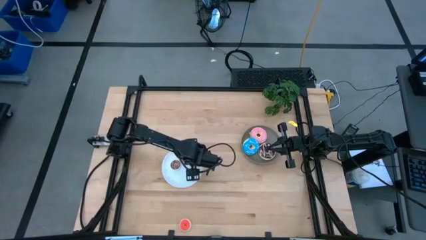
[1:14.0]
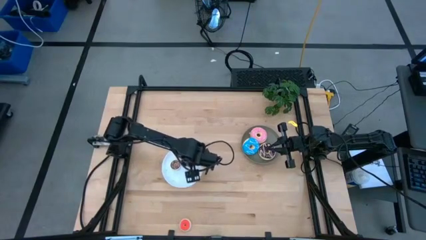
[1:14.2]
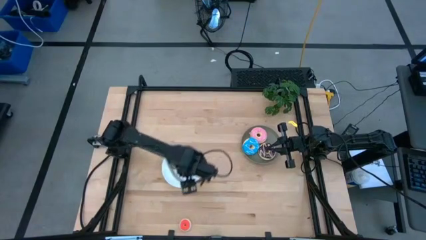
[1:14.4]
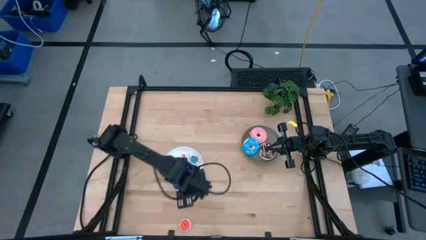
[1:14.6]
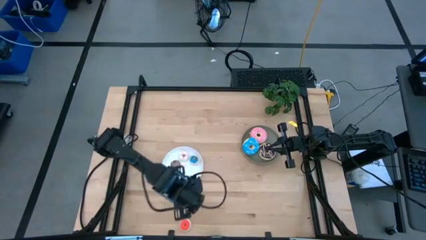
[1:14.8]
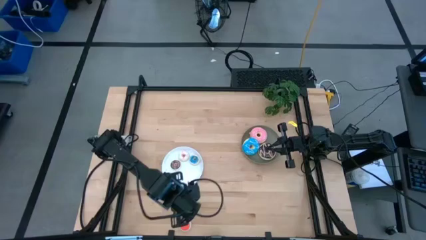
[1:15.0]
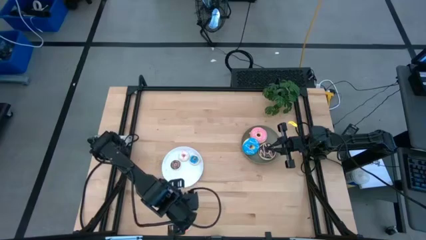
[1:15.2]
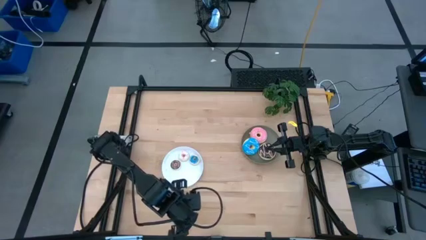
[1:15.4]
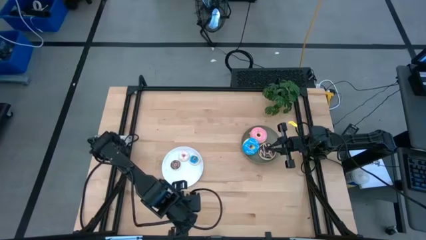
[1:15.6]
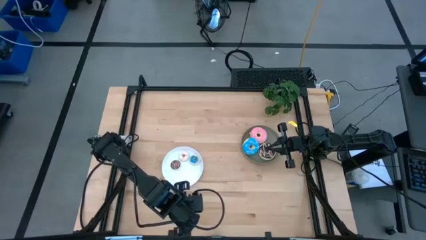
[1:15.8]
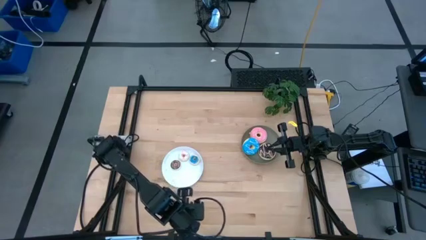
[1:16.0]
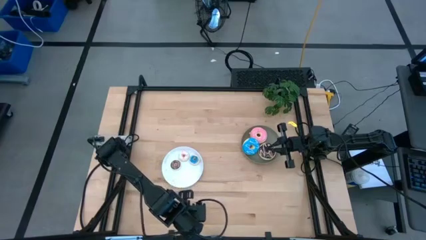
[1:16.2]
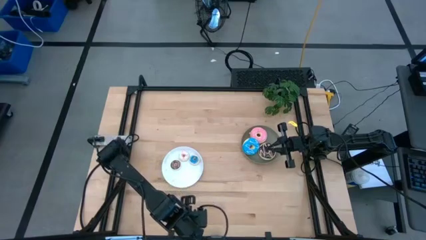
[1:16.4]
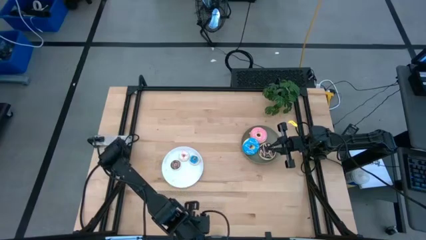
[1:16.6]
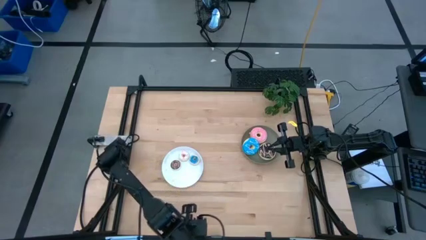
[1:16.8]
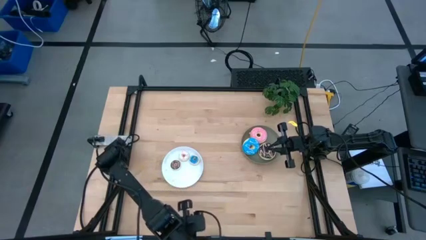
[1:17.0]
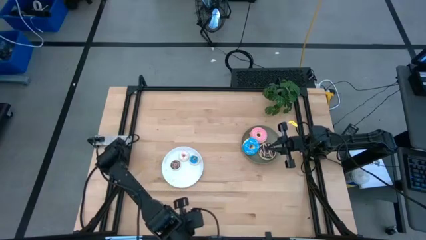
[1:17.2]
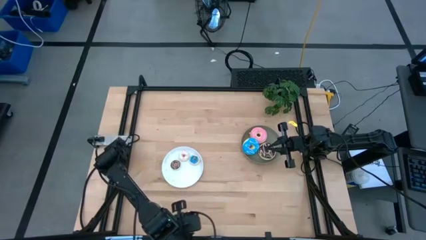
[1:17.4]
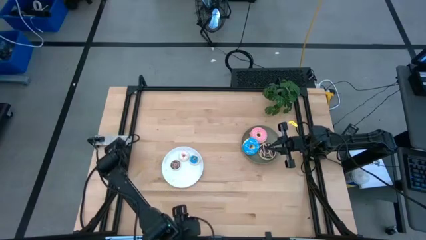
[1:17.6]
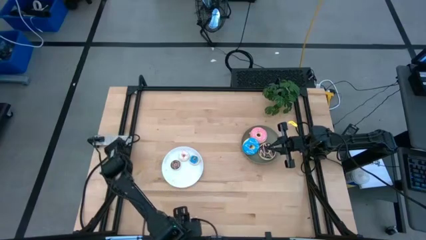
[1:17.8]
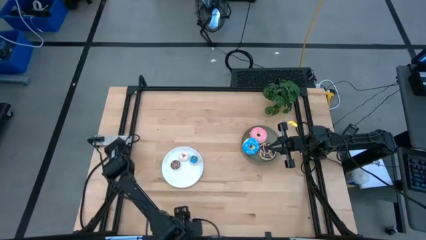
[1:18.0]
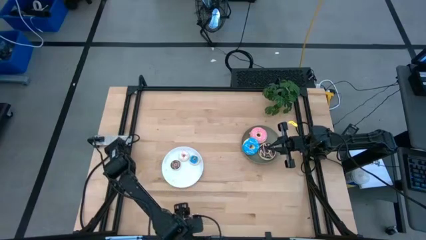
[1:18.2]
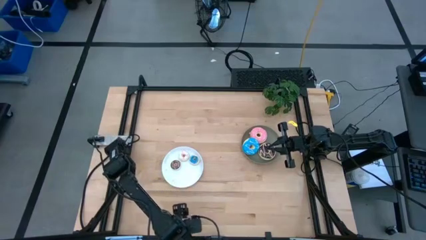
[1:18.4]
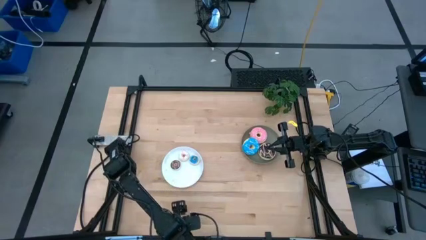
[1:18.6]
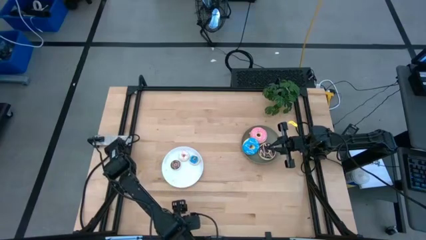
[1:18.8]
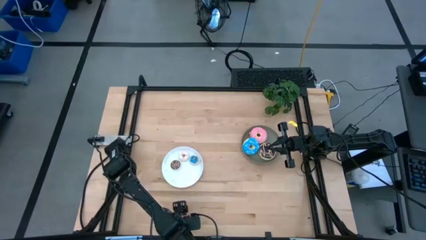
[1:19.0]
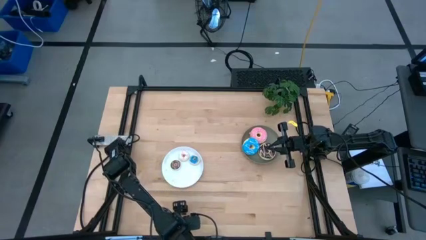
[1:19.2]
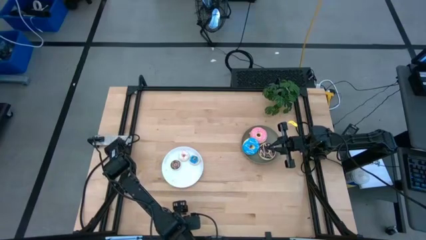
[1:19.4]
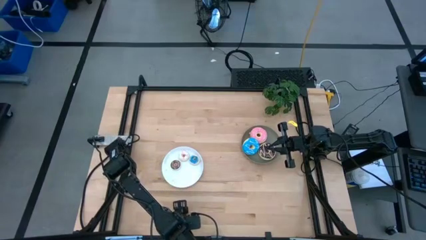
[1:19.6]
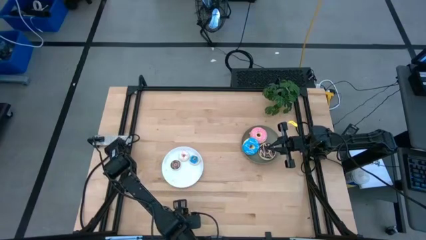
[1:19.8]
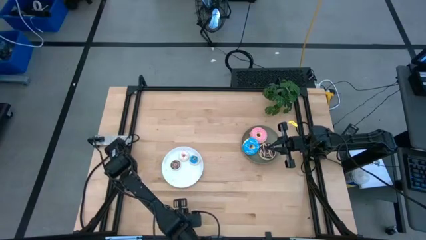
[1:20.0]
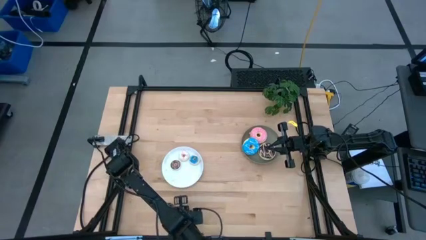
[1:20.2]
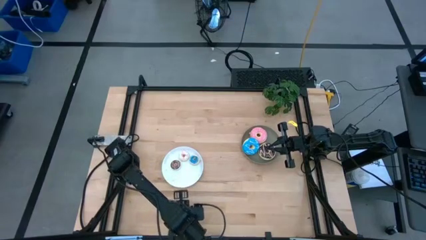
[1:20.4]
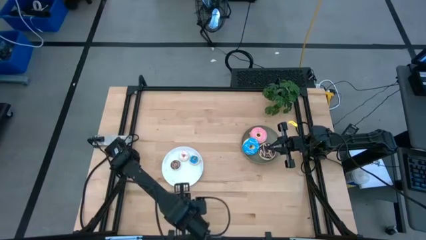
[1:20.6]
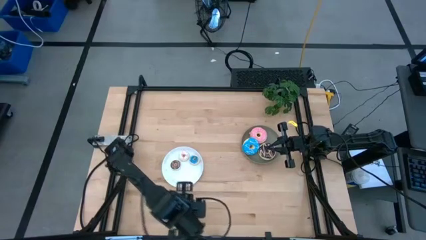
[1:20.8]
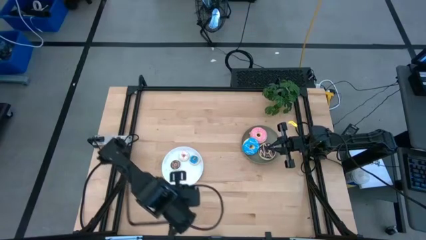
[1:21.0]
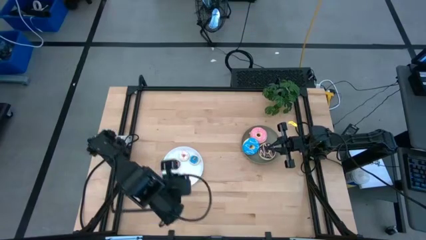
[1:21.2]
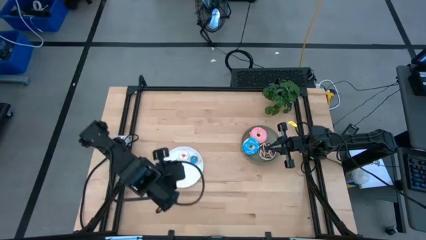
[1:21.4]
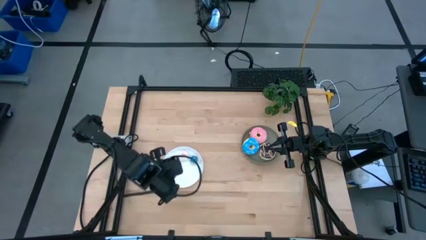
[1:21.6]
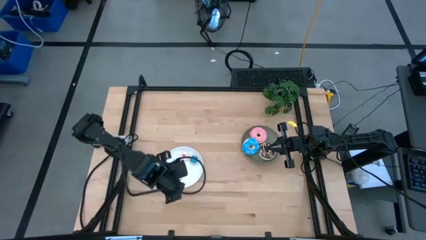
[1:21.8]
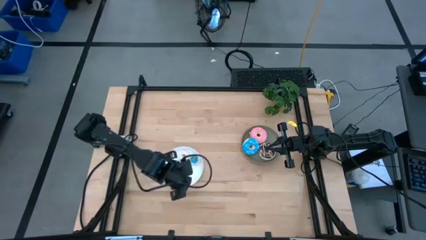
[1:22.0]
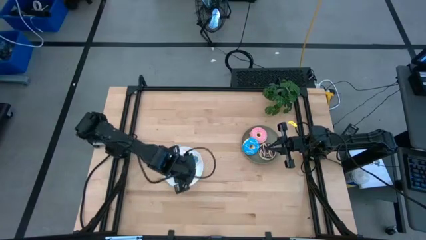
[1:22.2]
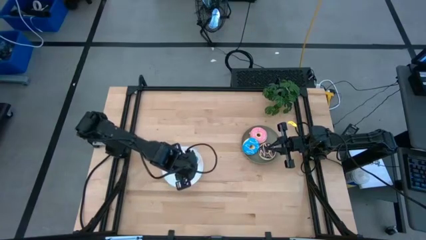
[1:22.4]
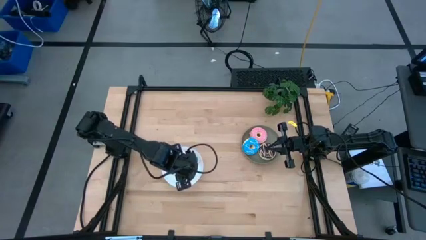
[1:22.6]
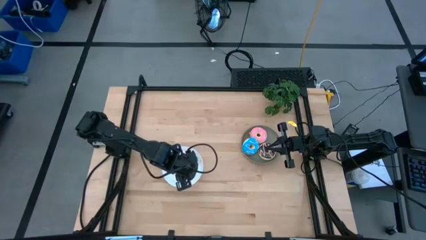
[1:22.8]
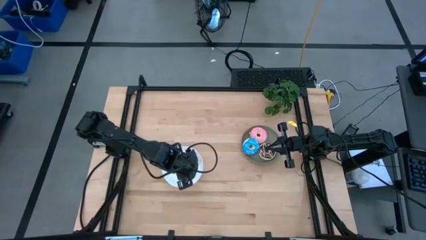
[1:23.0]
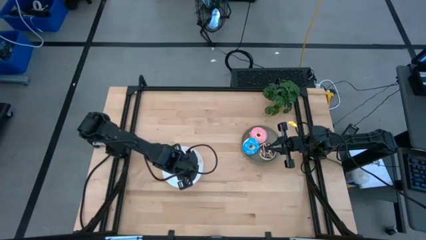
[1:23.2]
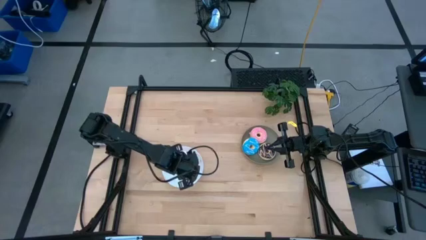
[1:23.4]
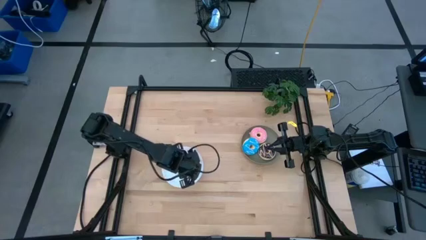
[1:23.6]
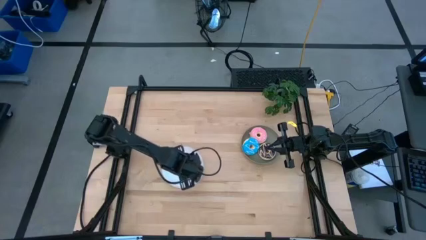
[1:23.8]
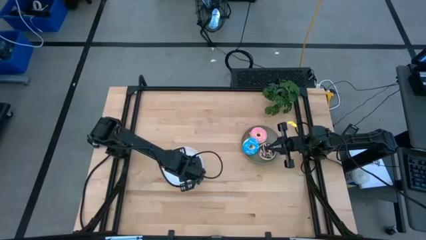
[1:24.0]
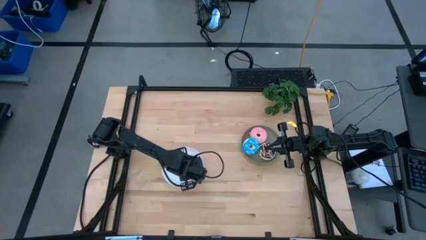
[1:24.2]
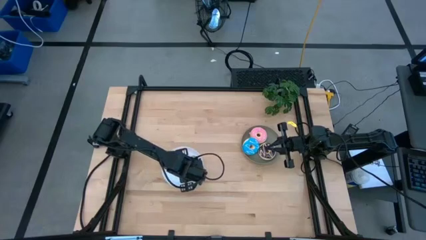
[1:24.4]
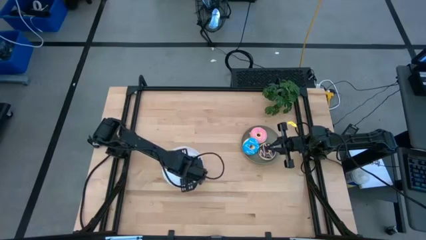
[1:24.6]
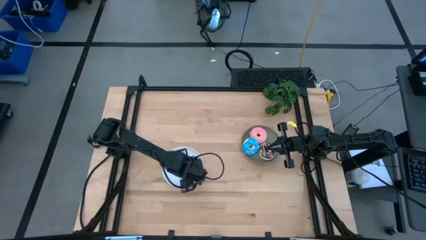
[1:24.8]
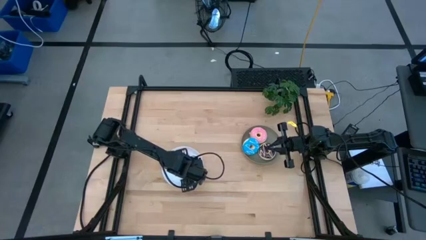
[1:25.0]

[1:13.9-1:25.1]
Task: Pick & Place donuts
Put the small red donut on the white plate

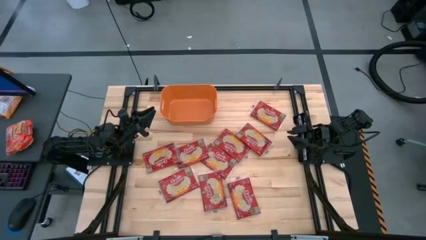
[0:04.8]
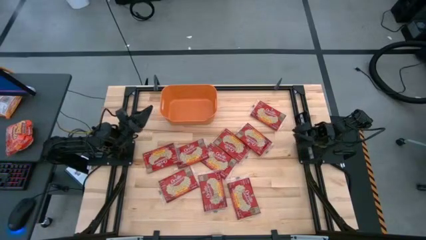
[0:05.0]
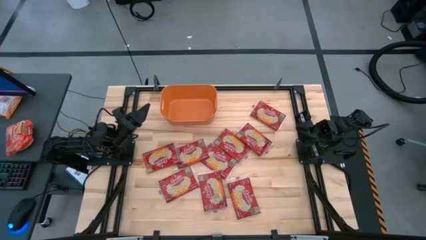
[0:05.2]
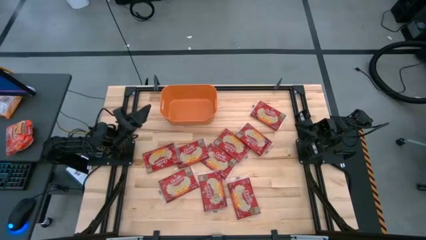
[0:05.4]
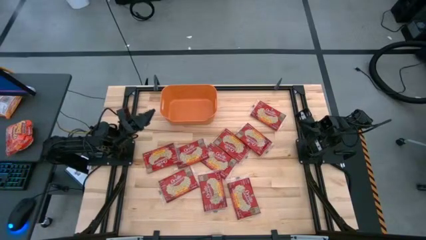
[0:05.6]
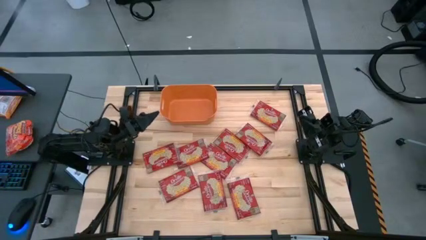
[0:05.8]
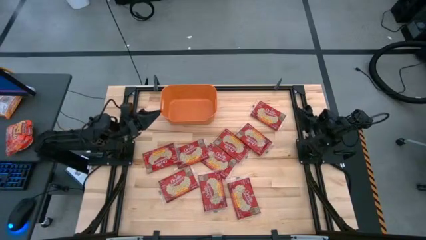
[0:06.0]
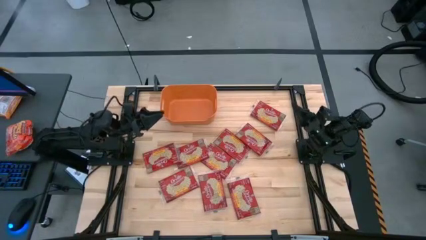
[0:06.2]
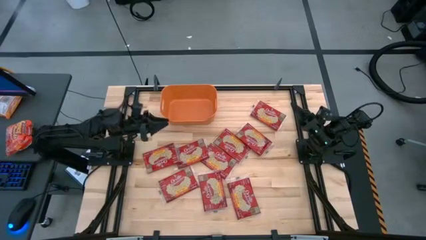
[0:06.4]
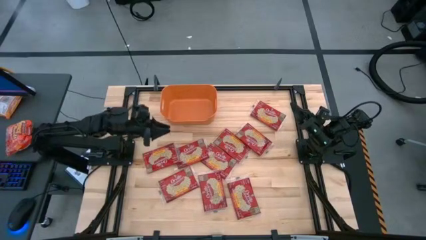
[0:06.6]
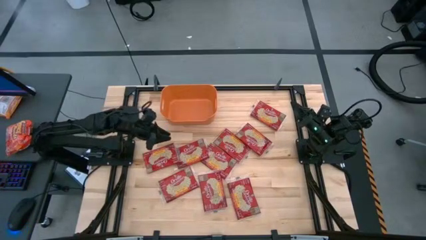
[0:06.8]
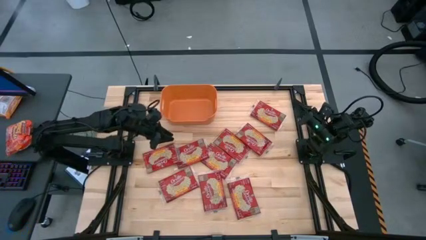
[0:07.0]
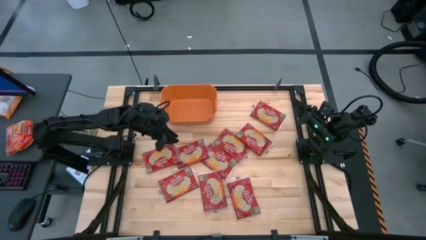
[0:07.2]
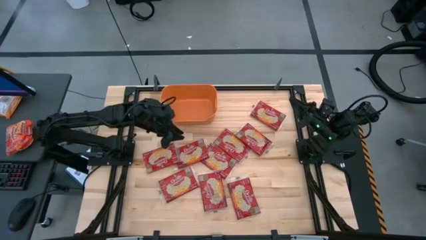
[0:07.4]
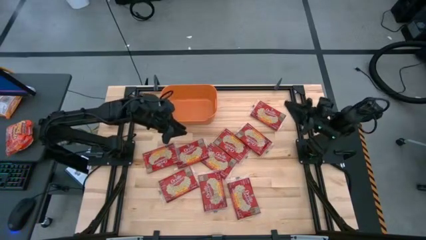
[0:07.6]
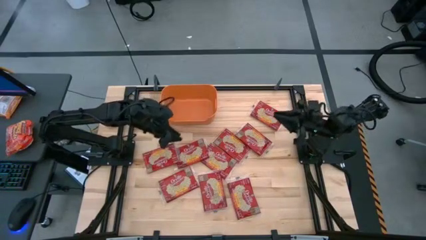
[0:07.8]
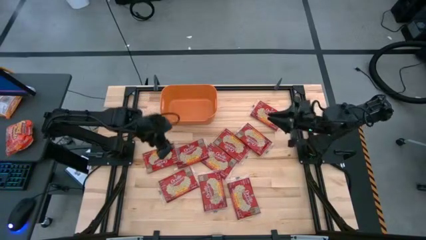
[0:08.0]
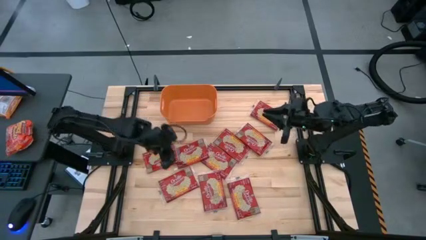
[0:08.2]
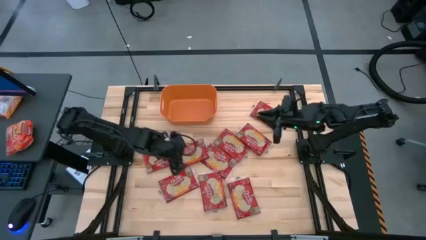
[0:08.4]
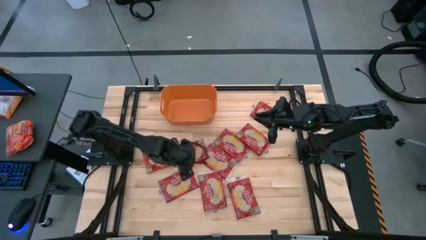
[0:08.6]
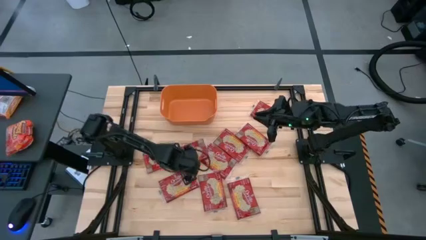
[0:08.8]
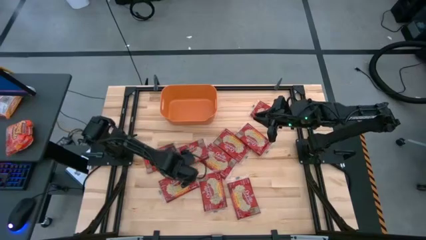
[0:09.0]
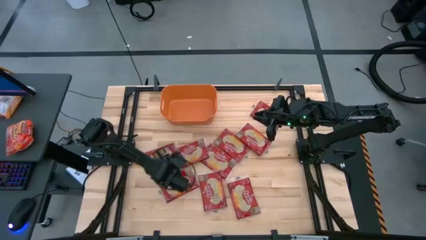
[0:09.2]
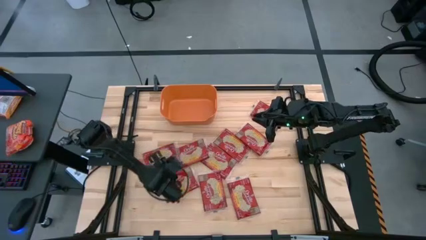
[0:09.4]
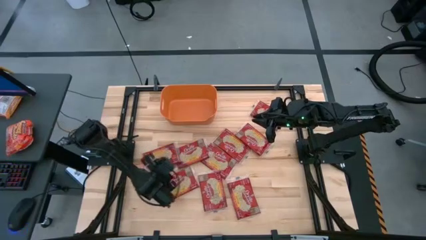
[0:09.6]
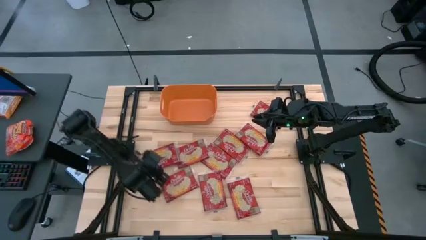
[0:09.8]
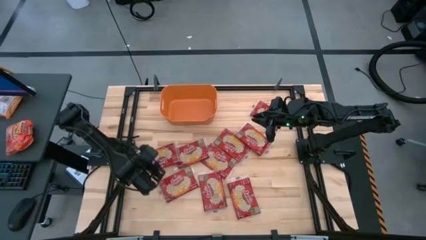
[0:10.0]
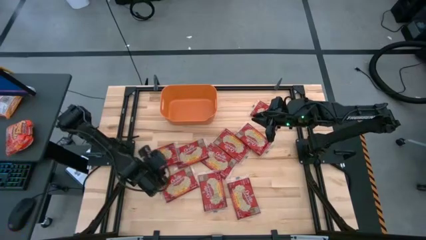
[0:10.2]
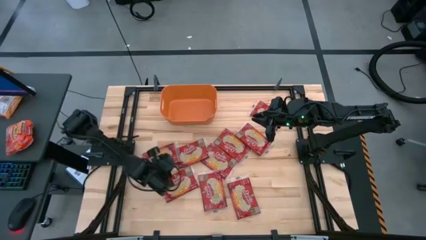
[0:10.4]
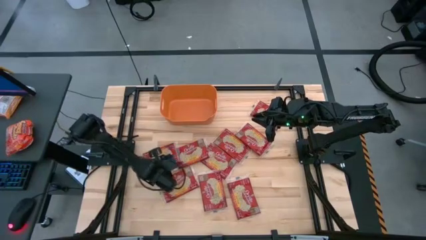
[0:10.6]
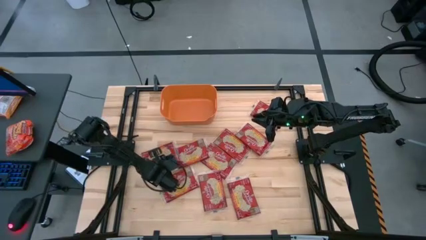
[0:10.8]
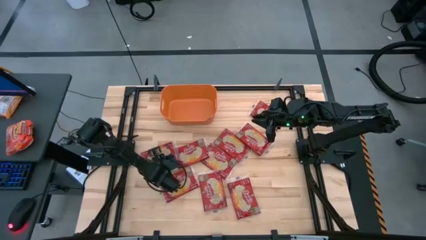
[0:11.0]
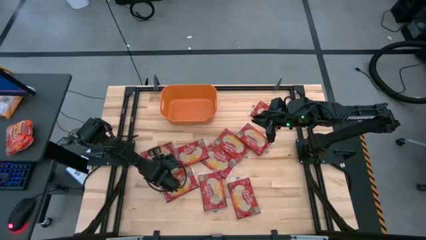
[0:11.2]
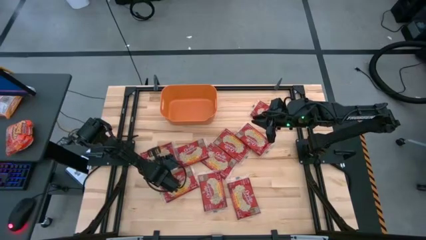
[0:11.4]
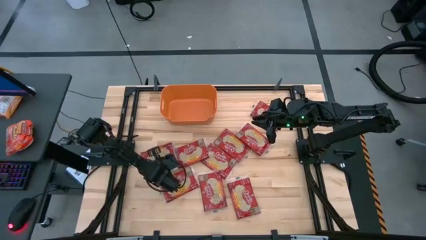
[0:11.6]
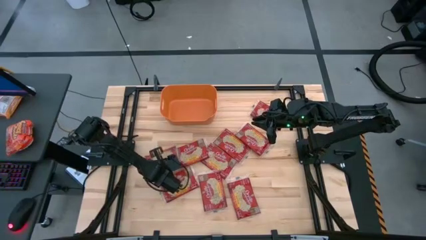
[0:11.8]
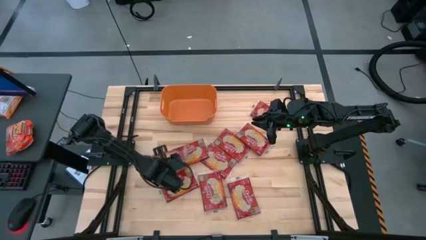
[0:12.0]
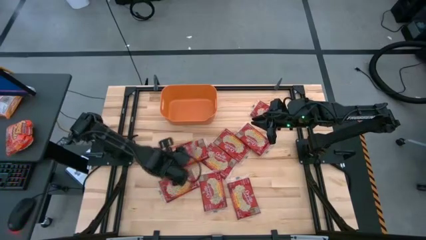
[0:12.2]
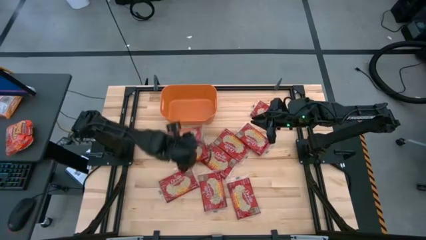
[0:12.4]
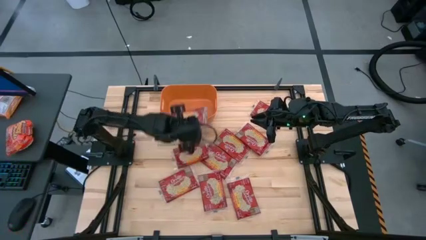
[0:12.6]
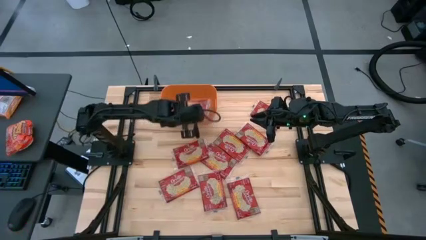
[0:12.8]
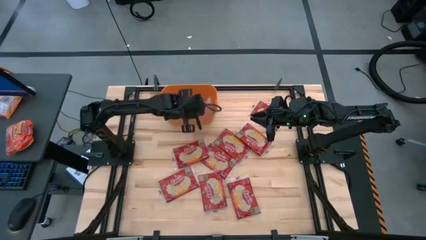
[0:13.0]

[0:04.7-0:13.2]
Task: Sort popcorn bags into baskets
Put the red popcorn bag into the orange bin
